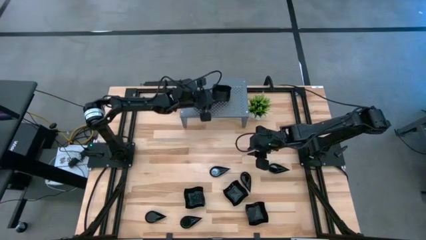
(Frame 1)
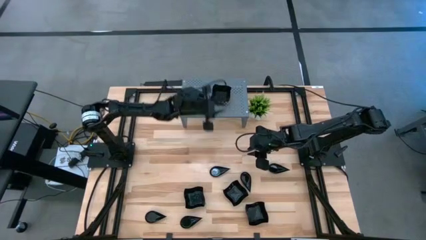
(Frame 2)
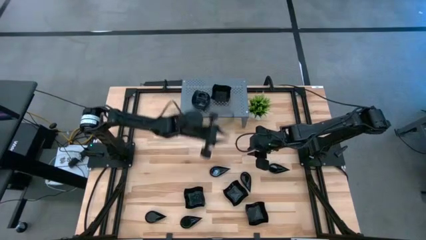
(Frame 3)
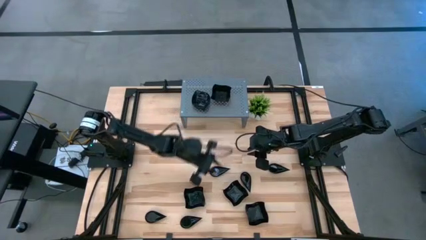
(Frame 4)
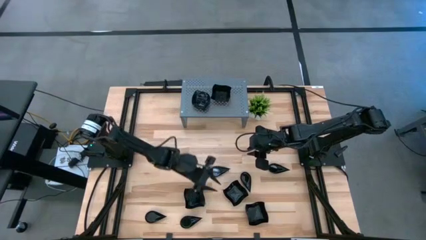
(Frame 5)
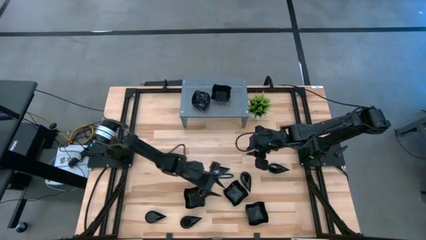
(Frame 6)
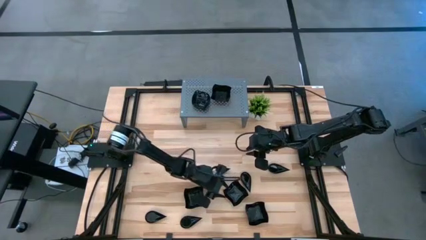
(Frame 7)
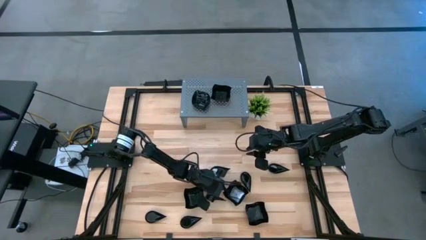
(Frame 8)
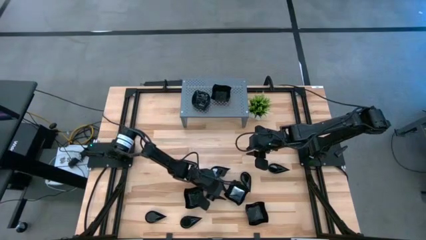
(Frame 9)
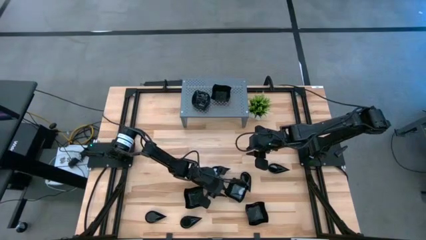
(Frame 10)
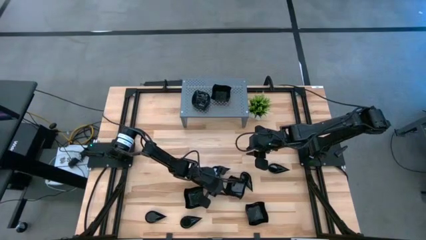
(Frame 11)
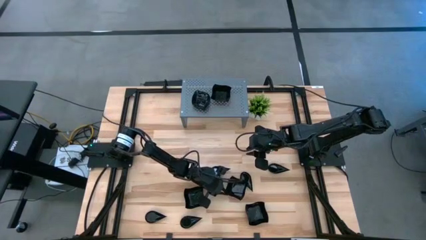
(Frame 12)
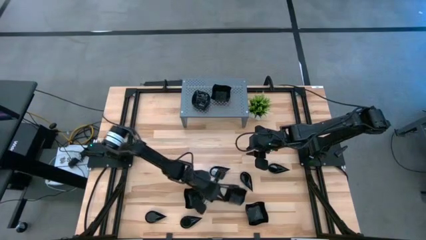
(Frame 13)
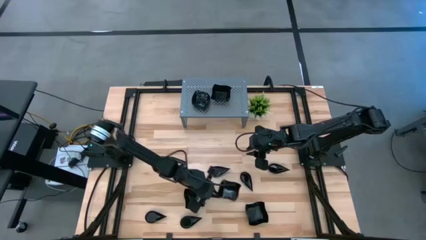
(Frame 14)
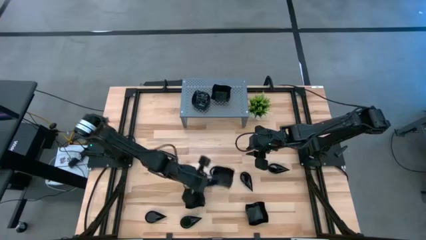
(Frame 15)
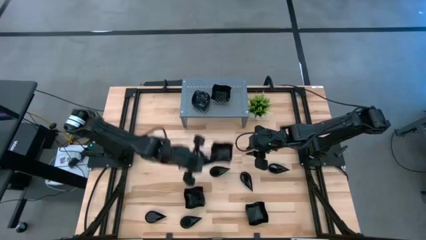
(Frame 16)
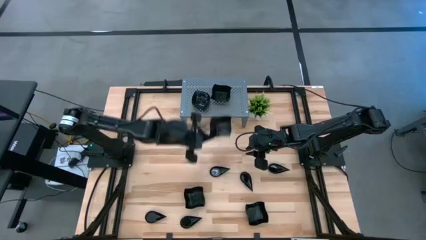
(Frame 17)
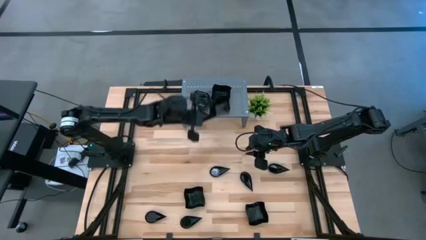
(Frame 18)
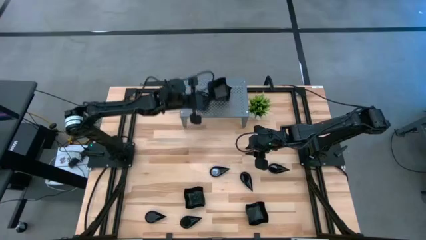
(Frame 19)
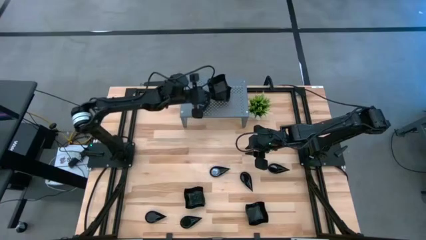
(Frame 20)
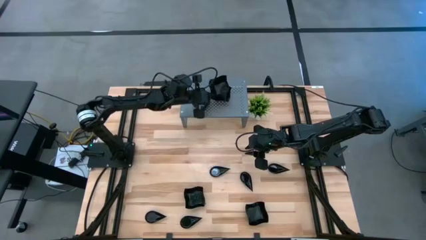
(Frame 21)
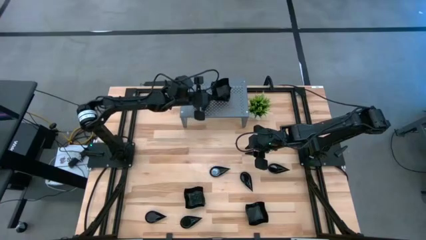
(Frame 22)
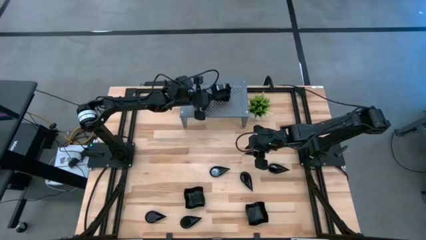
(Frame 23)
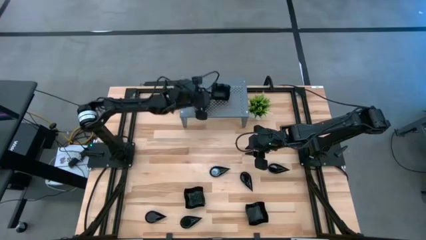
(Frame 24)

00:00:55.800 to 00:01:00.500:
Task: Pick & Place Mini shaped plates
Stack the black distorted square plate on top of the stacked black distorted square plates on the shelf

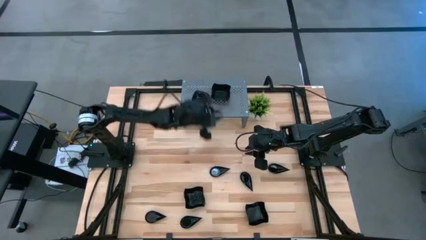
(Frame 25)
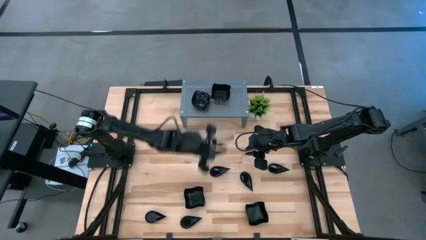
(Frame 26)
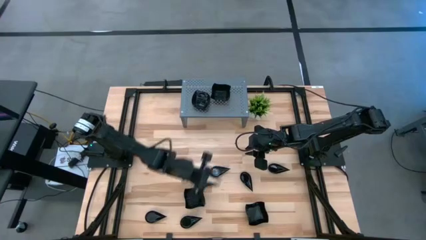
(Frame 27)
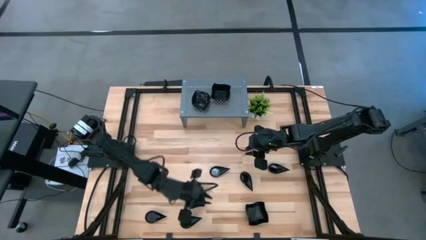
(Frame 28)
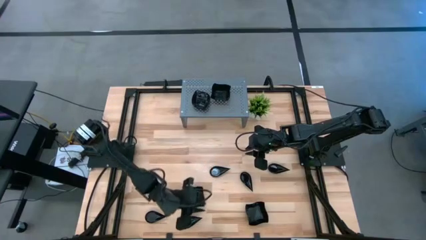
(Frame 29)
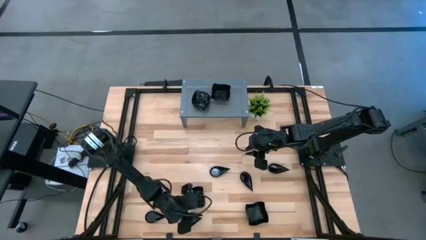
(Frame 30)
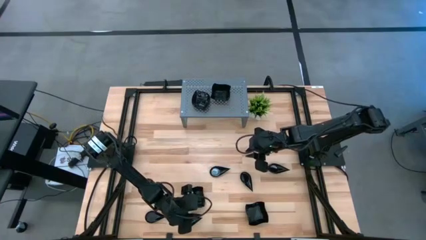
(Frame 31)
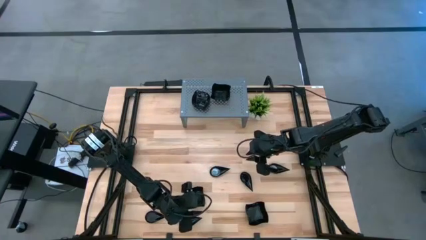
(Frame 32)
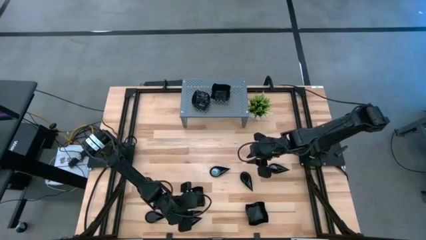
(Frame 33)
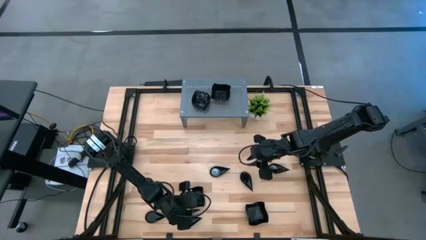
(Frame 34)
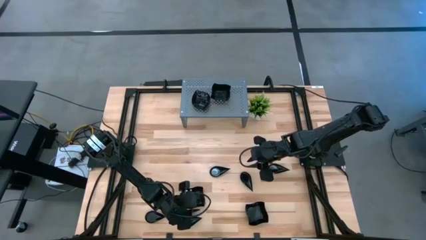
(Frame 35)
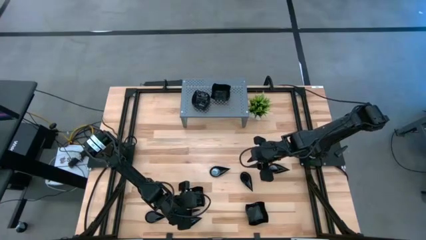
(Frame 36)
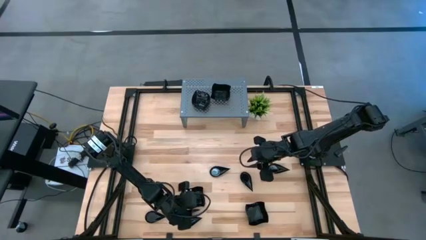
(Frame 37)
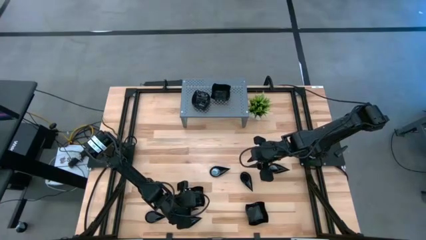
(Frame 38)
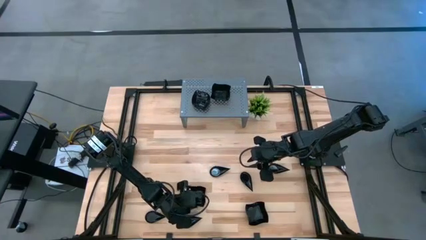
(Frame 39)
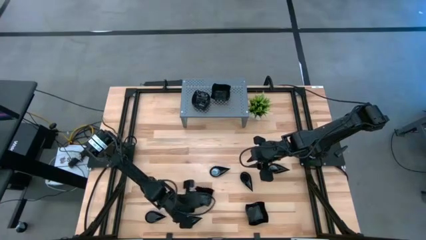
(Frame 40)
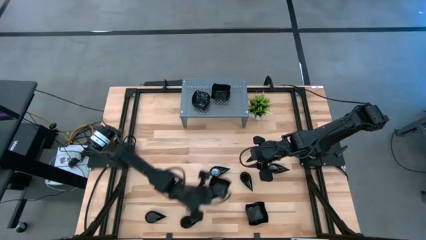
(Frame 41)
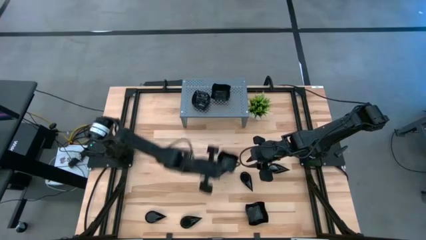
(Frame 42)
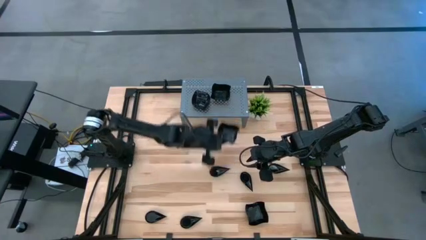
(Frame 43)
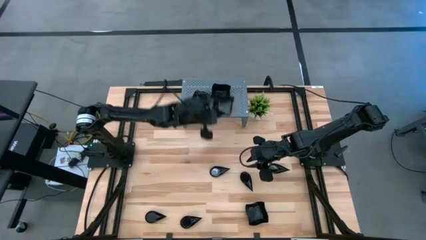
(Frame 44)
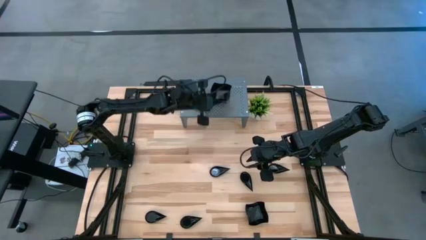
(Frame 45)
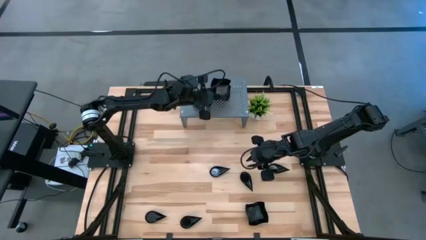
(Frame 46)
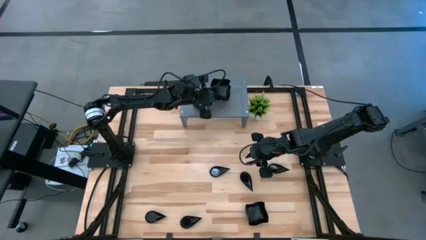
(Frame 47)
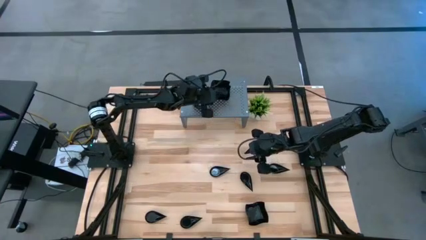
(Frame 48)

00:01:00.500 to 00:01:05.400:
Stack the black distorted square plate on top of the stacked black distorted square plates on the shelf

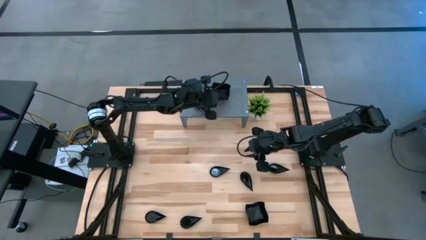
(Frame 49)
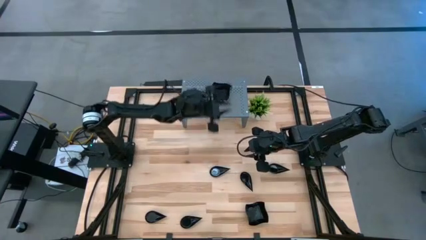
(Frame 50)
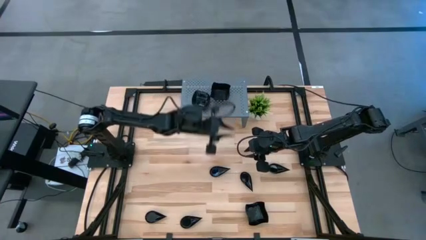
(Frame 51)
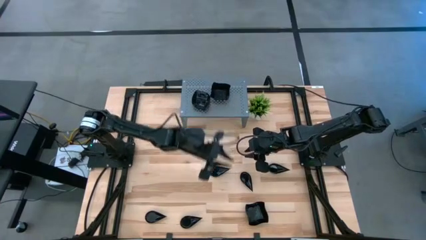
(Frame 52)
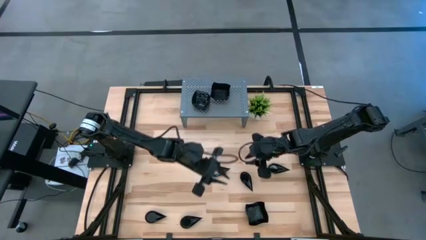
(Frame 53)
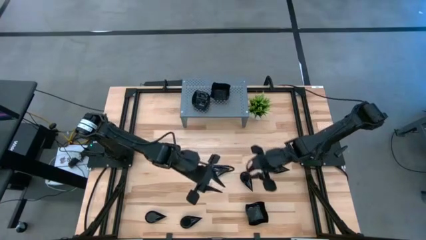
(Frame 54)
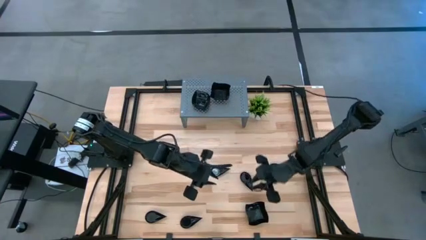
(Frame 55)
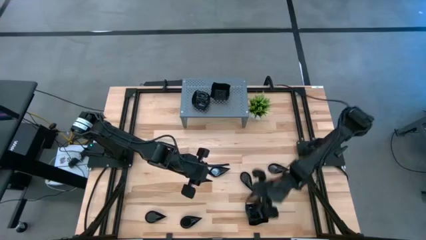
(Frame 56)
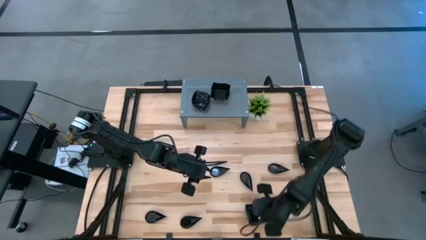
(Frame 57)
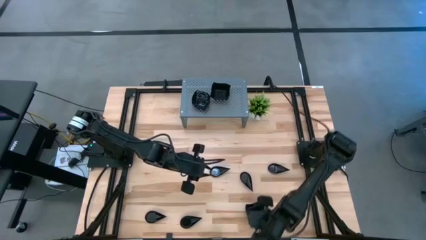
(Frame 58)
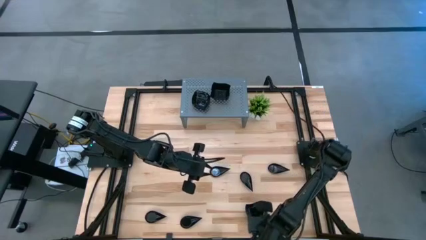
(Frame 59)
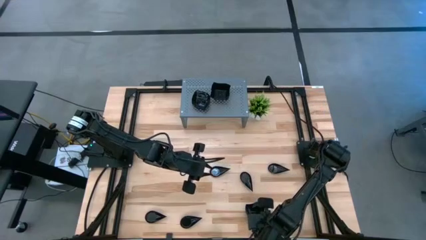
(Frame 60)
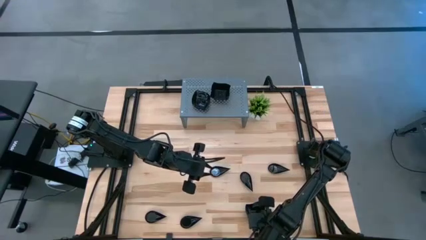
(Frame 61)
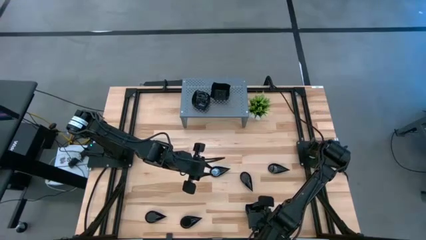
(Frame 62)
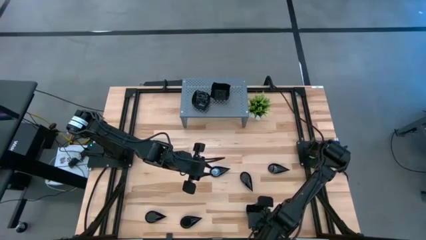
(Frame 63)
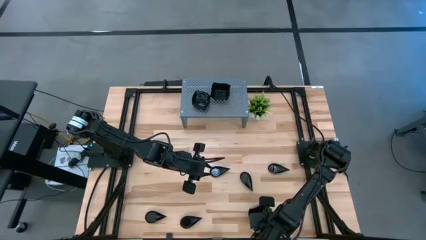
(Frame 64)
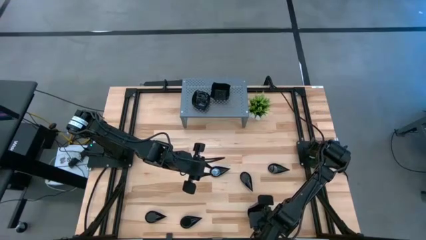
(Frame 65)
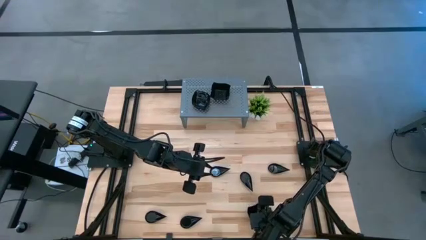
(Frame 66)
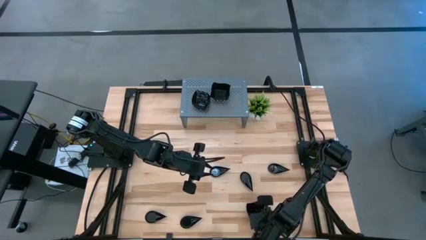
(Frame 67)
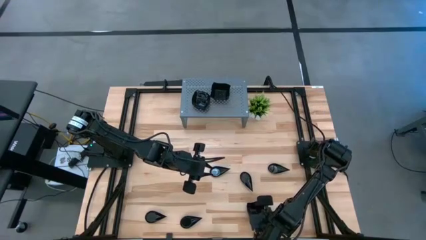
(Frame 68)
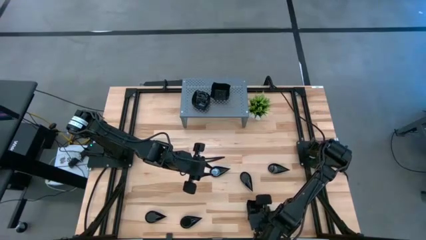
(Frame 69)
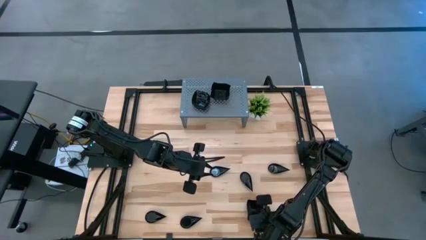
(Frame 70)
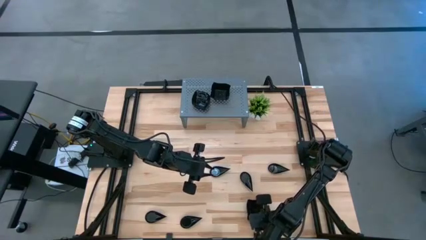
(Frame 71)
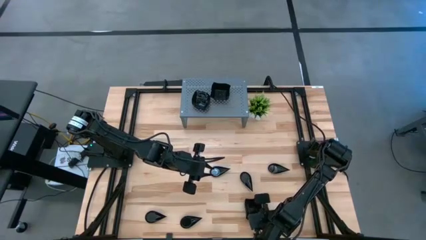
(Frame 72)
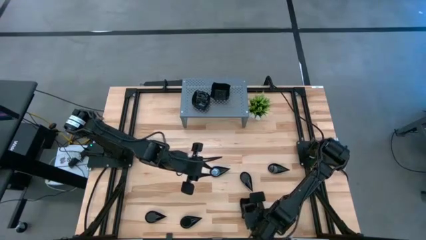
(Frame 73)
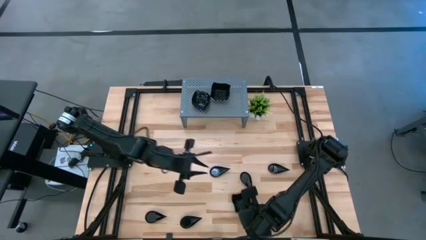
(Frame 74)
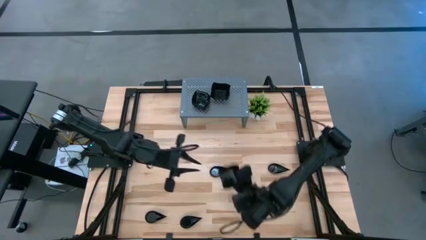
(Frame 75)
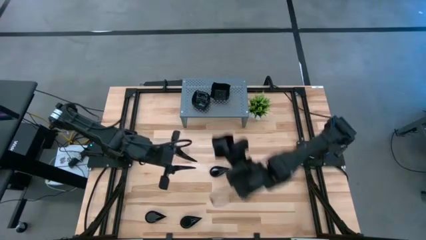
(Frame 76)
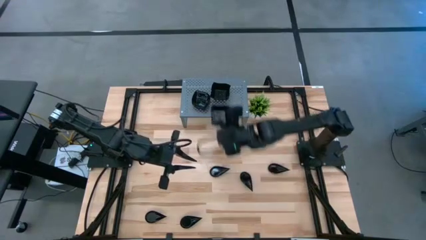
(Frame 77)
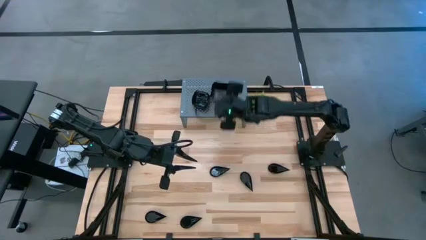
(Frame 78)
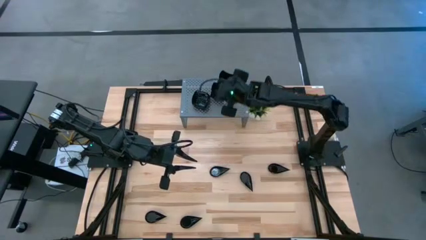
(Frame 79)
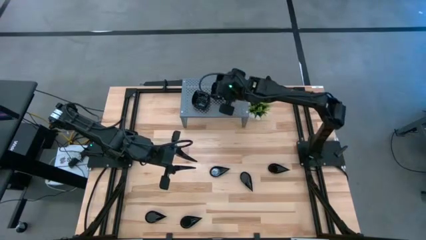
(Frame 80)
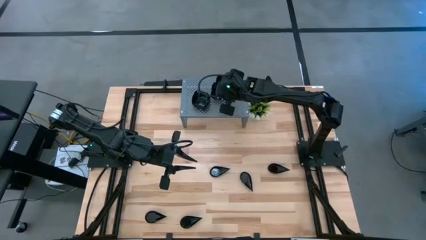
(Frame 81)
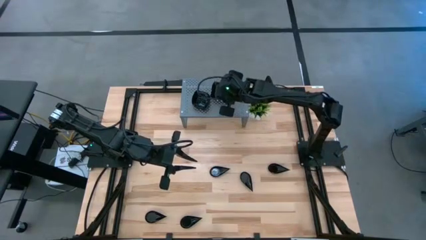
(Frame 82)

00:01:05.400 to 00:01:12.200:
Stack the black distorted square plate on top of the stacked black distorted square plates on the shelf
